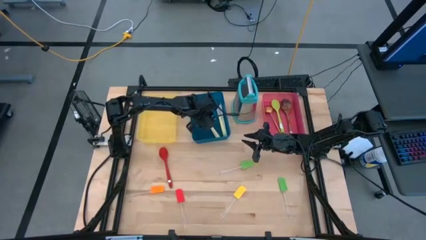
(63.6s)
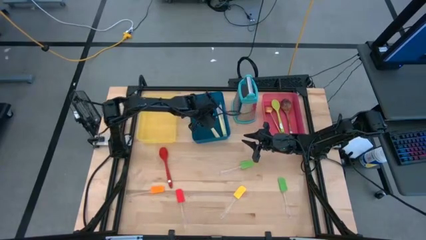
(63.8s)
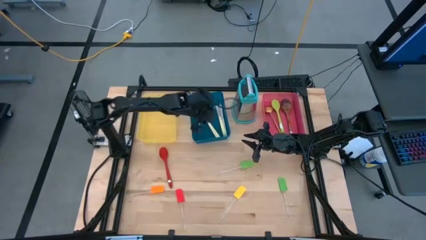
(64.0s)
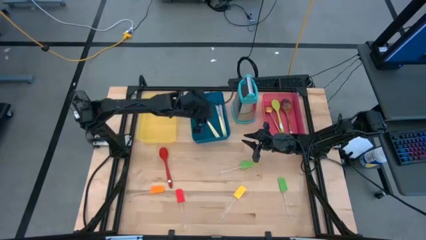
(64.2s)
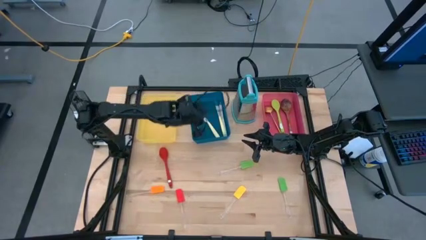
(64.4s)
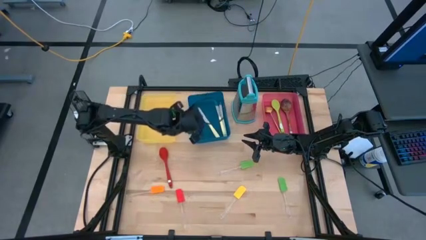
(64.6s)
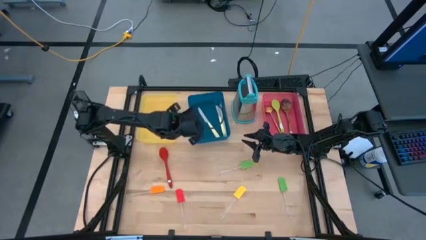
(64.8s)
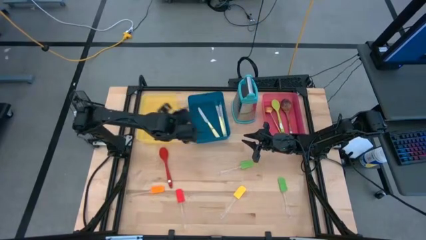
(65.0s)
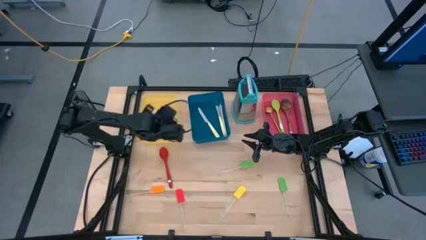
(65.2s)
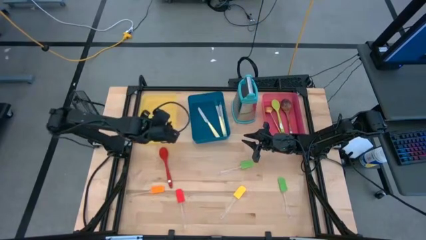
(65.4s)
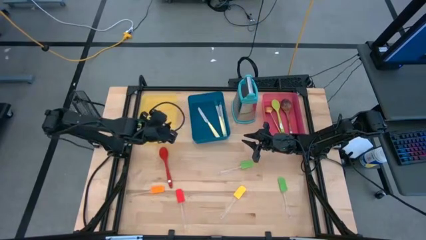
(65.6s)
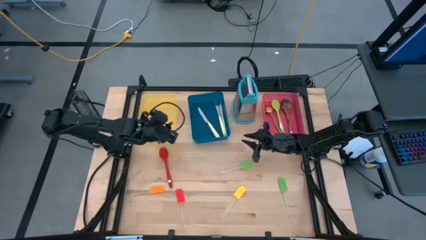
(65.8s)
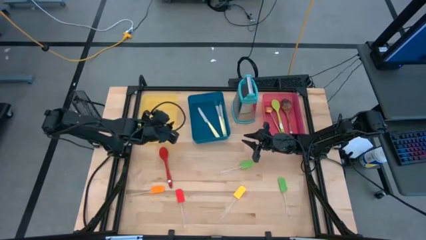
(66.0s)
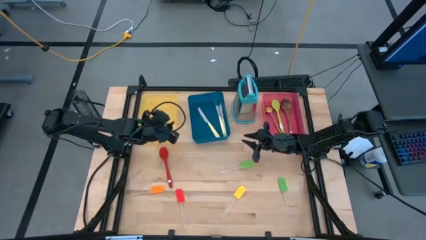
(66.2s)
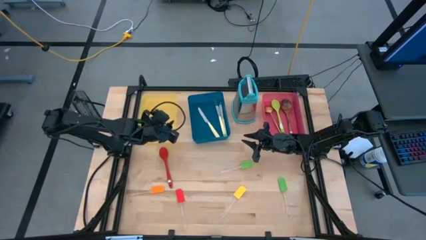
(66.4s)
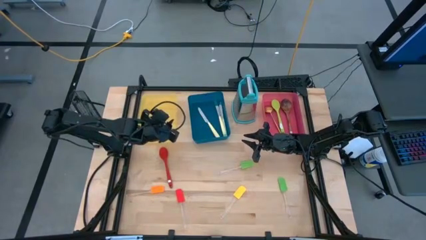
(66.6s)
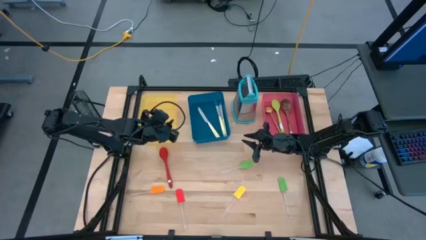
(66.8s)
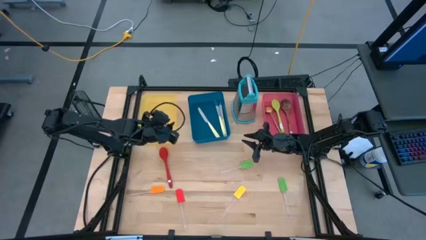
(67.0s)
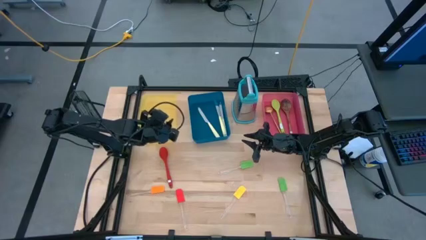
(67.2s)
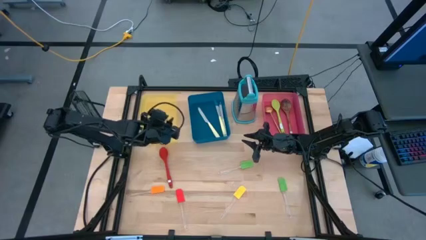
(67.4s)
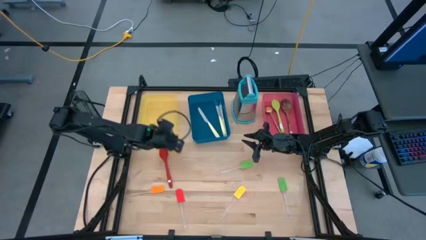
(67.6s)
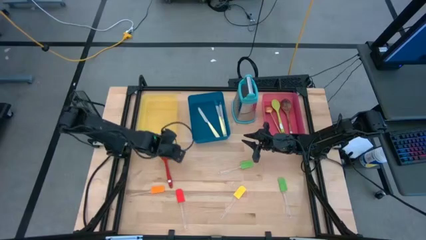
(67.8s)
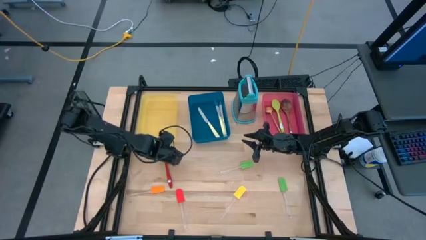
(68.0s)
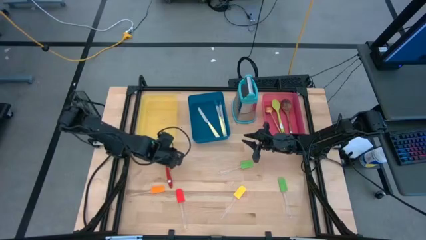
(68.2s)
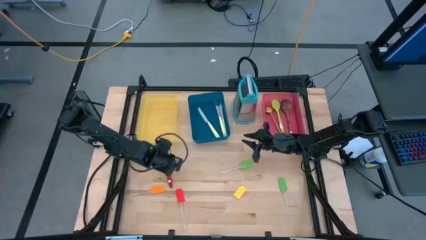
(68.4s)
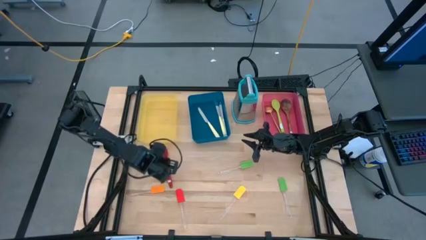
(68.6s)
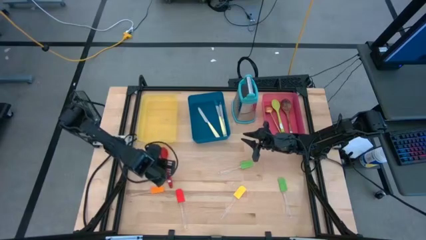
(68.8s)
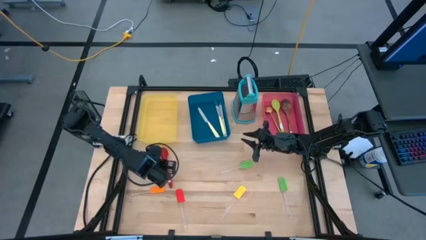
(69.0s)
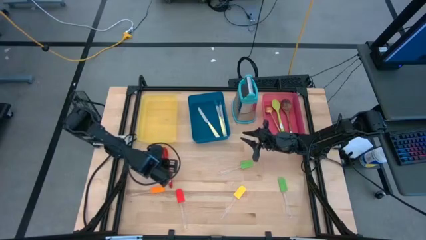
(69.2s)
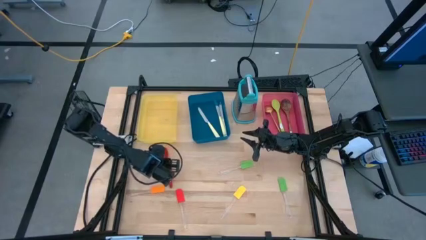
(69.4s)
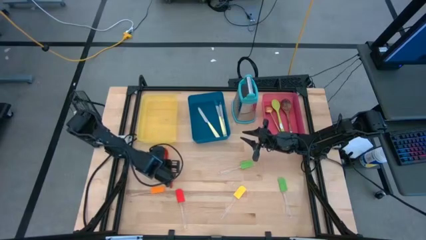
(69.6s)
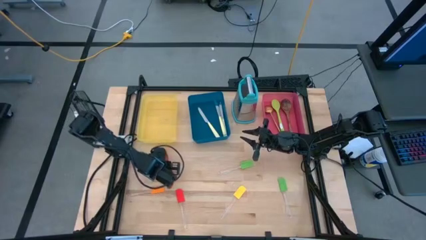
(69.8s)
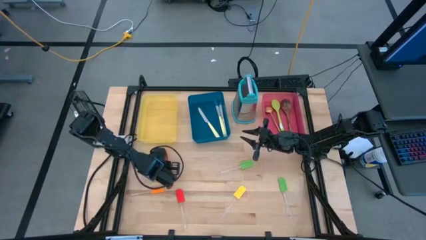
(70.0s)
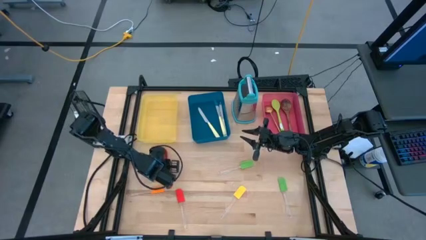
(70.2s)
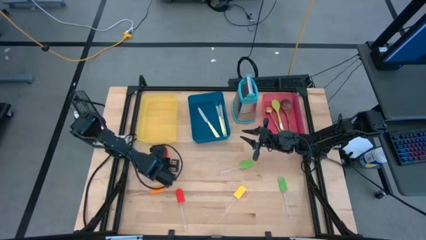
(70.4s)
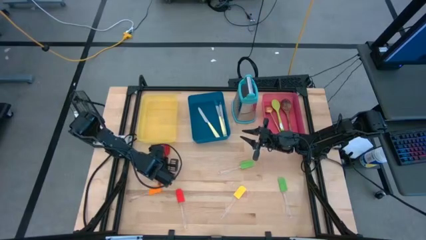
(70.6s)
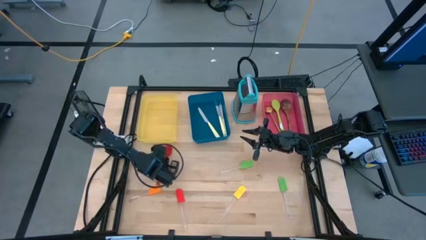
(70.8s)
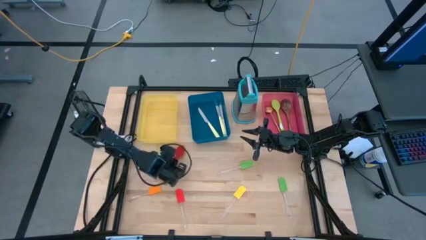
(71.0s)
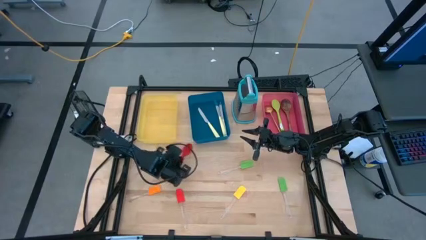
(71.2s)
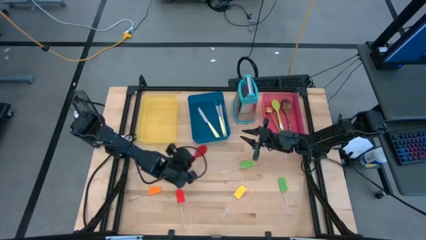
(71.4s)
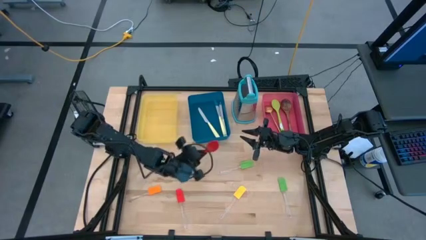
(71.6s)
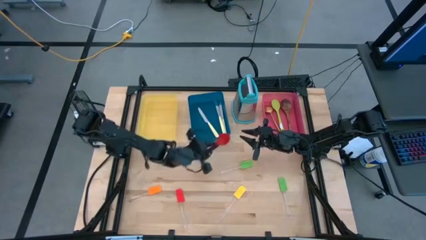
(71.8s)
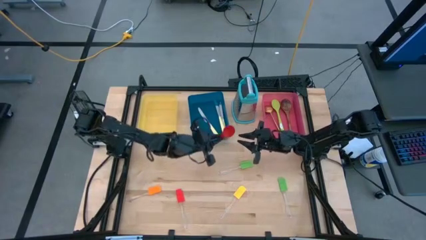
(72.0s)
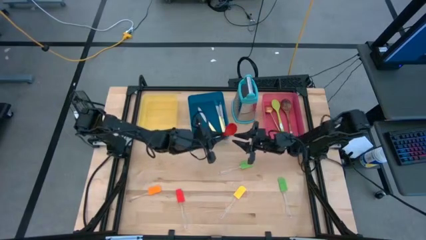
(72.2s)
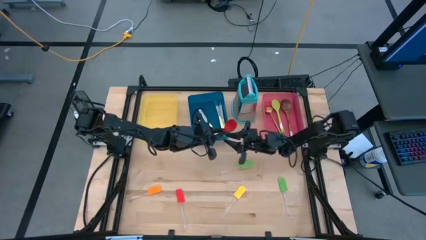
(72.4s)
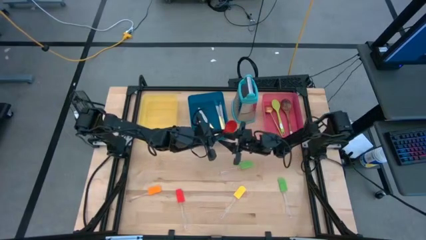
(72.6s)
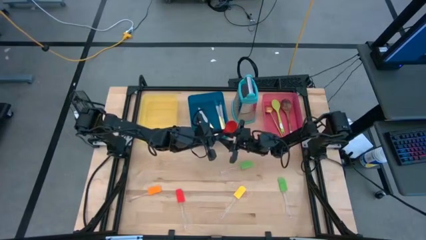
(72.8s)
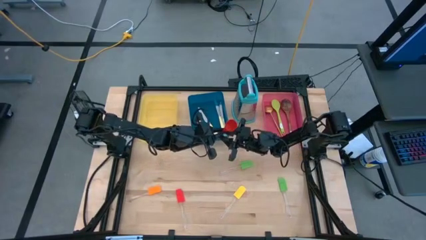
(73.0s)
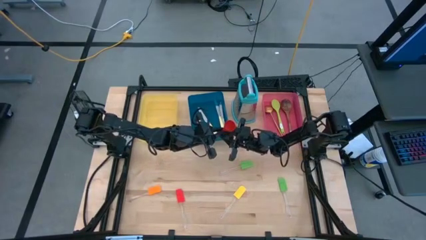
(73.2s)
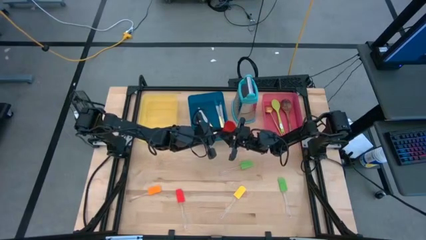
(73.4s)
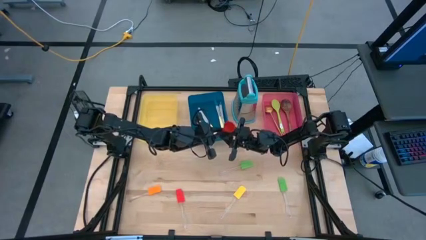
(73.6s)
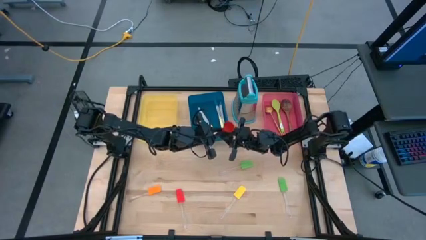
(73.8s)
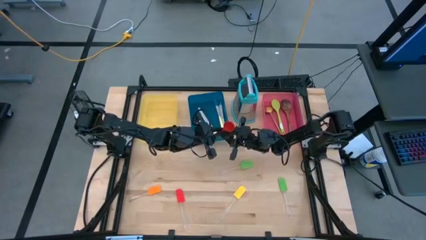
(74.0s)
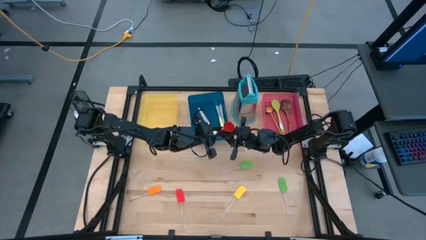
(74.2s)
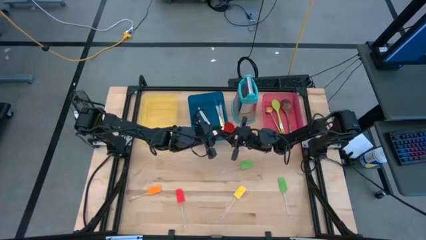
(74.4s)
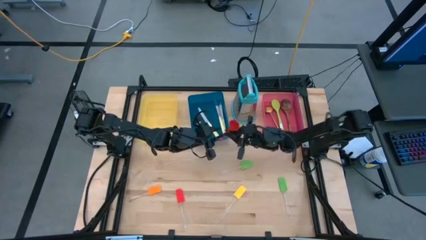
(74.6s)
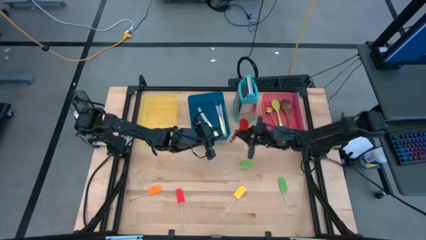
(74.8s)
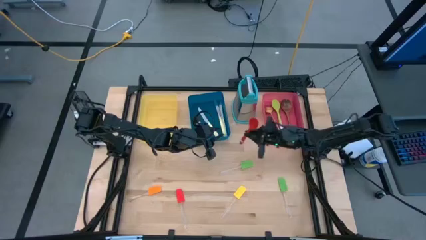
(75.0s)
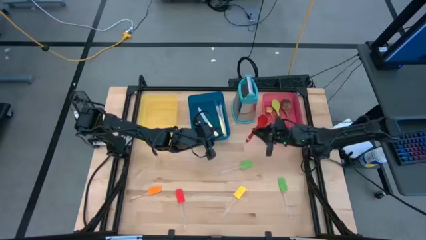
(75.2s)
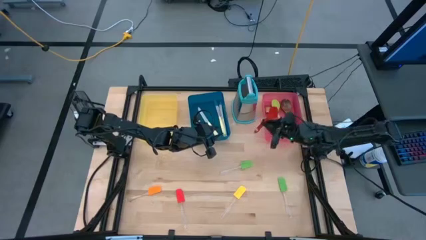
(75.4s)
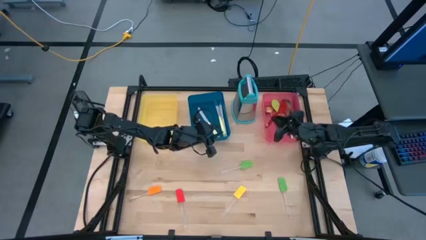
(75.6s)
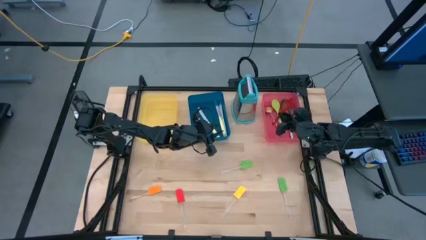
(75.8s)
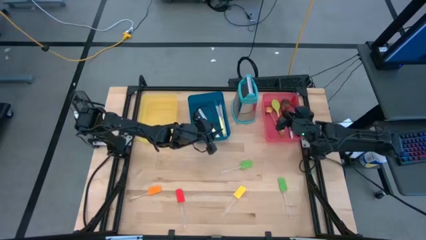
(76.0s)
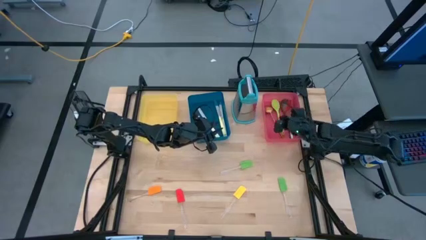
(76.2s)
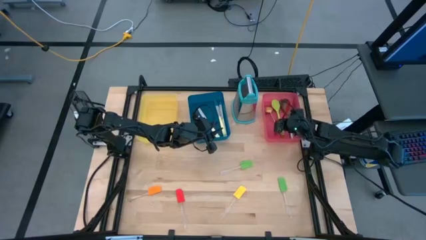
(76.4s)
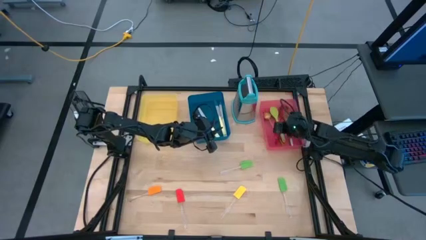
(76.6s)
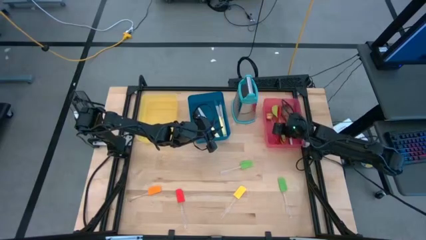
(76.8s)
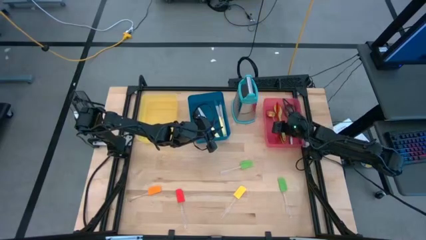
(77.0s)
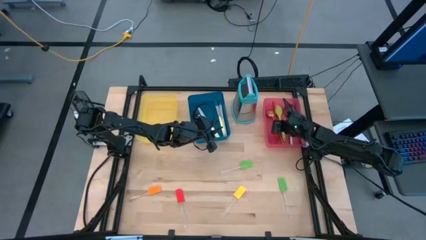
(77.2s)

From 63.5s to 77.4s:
Task: Pick & Place Kitchen Items
Put the red serving spoon into the pink bin

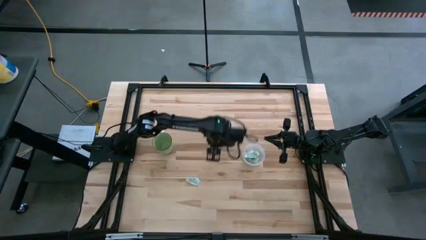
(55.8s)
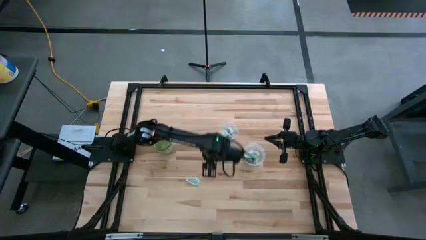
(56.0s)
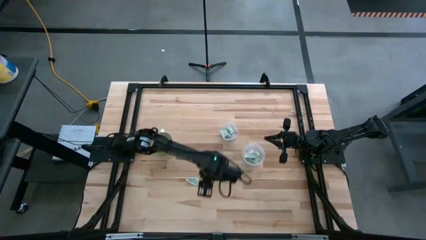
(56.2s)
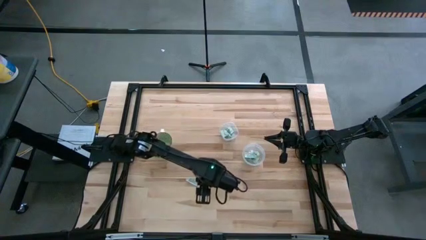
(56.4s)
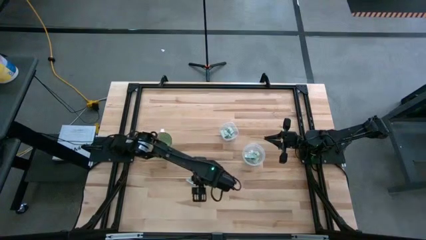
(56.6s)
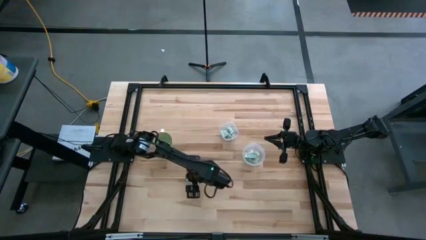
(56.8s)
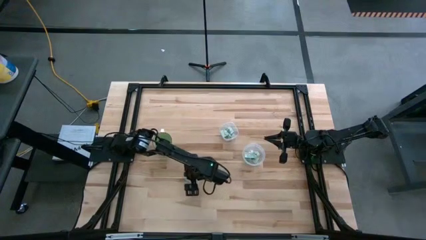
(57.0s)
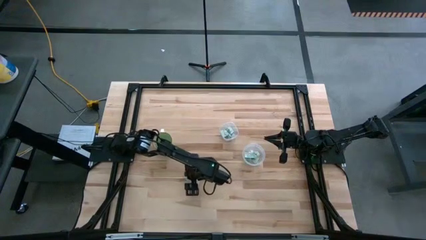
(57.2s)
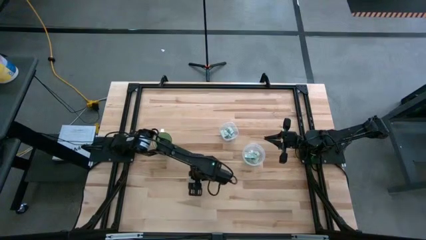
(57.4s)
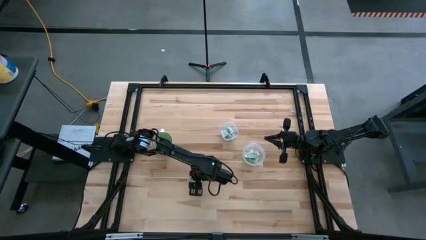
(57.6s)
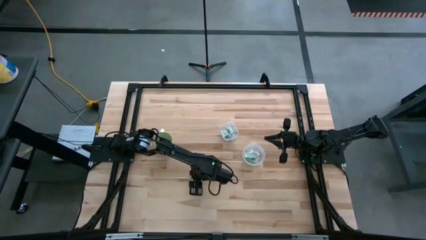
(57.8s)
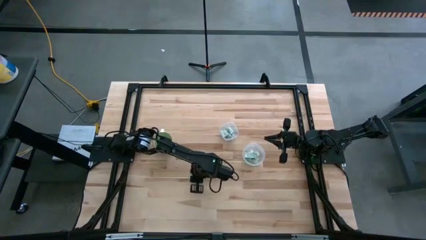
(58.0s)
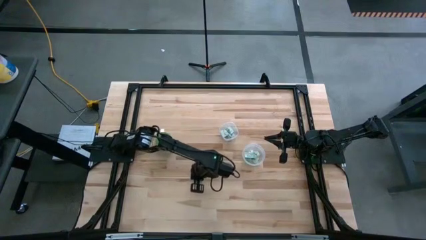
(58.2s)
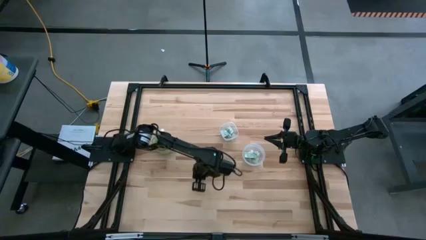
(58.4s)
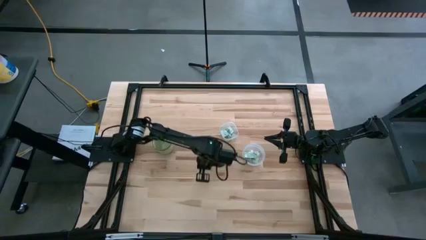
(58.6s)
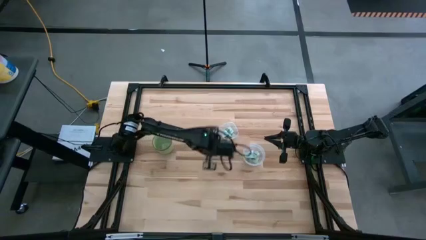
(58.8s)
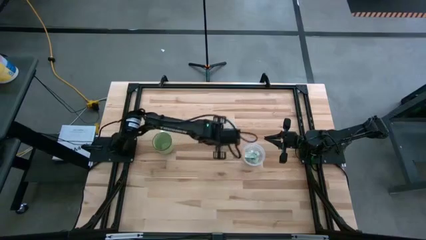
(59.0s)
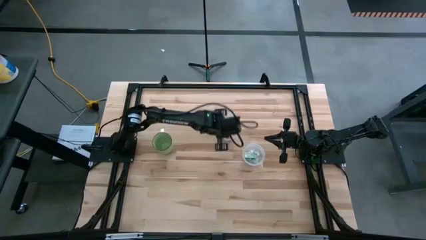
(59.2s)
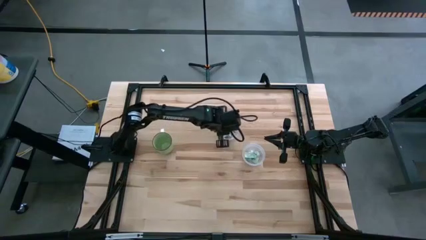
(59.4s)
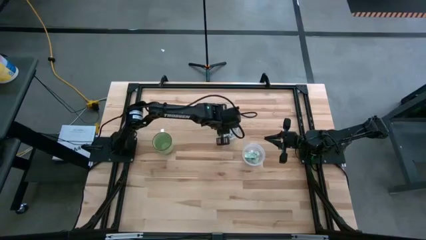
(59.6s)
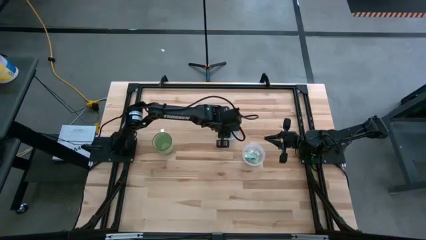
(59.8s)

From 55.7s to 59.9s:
Task: Pick and place Stevia / Truvia into bins
Put the stevia packet into the top transparent container
